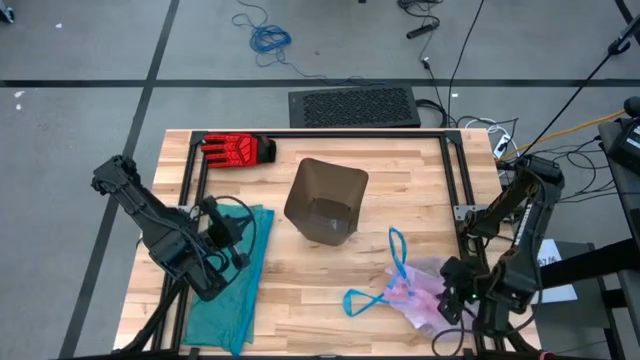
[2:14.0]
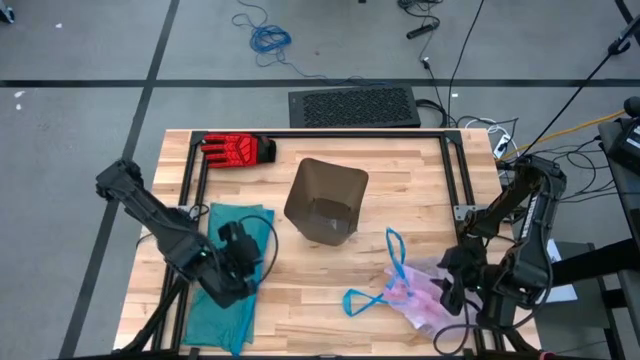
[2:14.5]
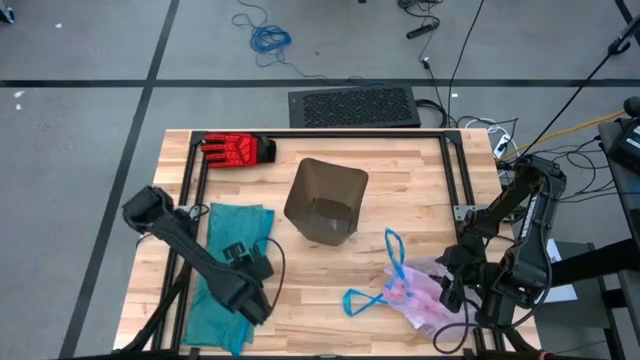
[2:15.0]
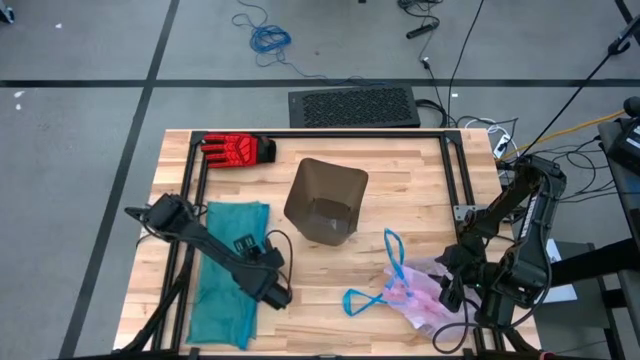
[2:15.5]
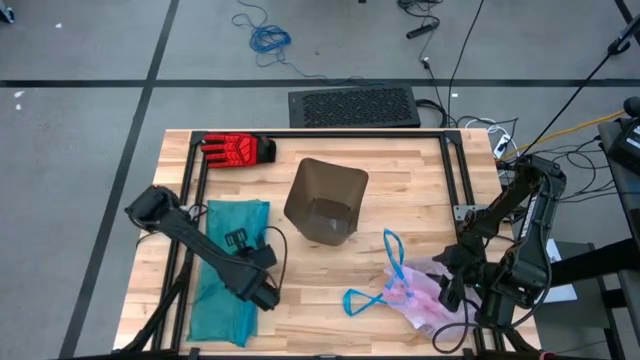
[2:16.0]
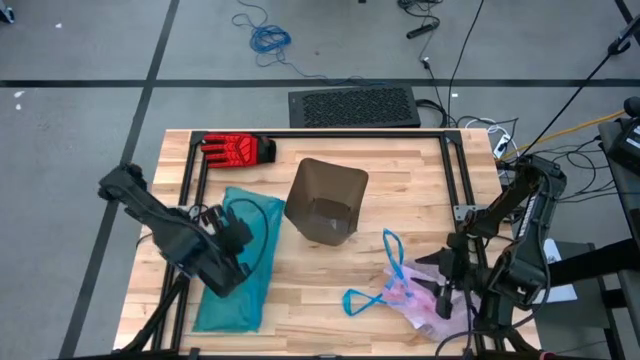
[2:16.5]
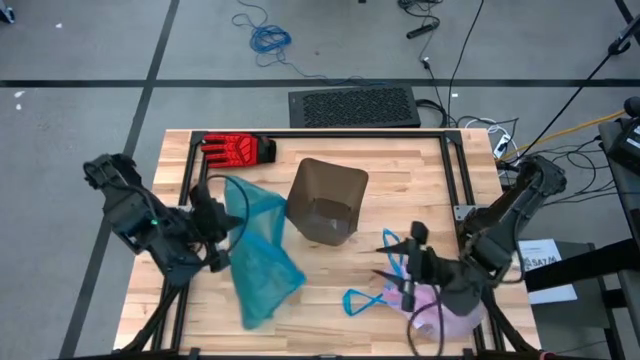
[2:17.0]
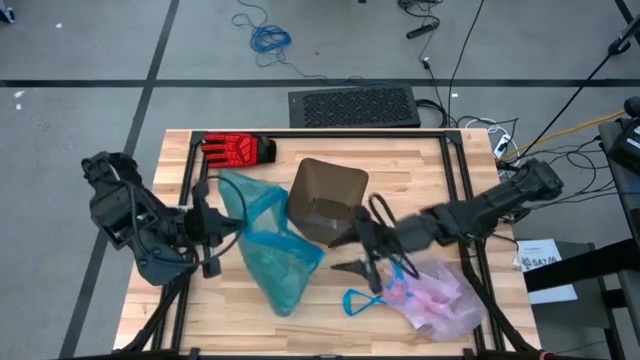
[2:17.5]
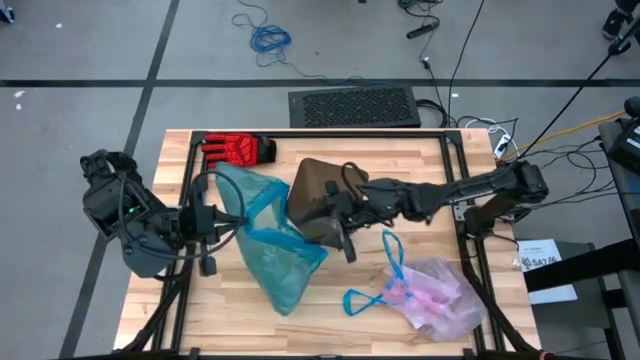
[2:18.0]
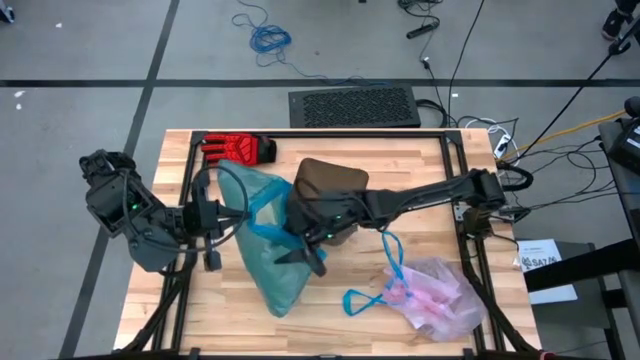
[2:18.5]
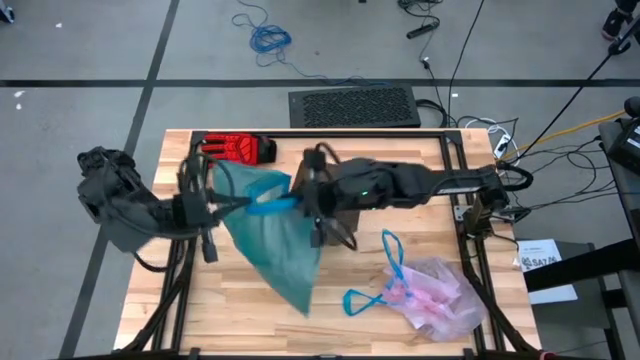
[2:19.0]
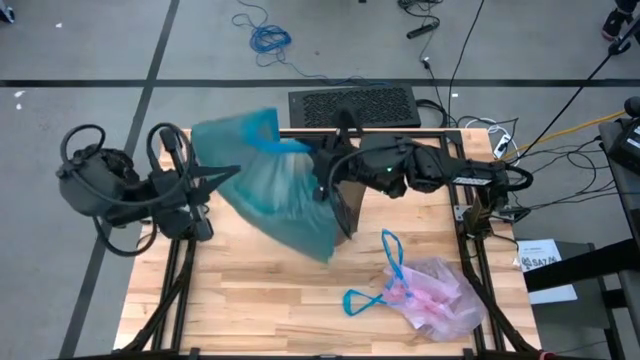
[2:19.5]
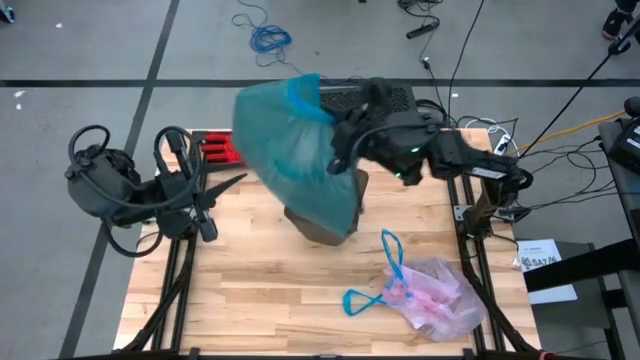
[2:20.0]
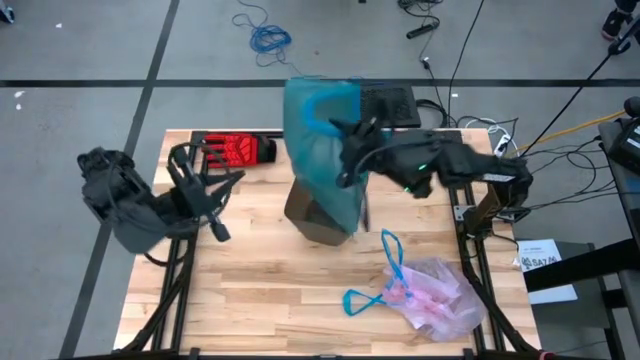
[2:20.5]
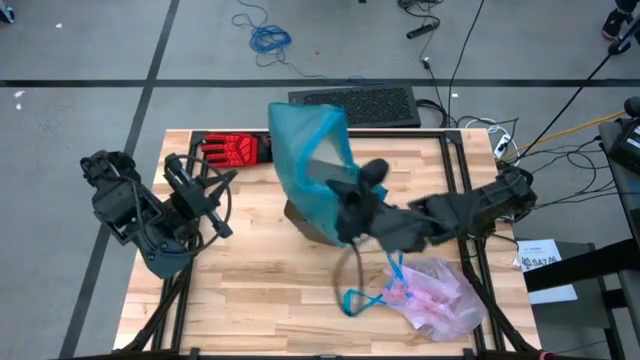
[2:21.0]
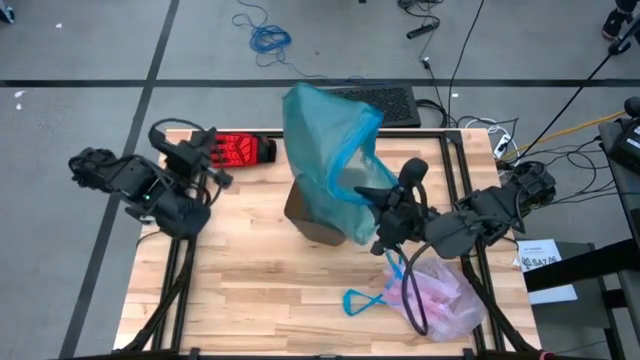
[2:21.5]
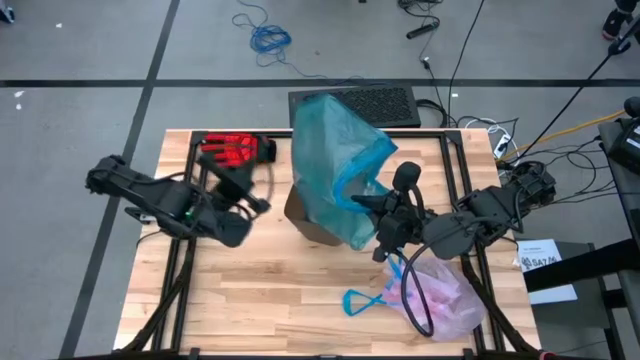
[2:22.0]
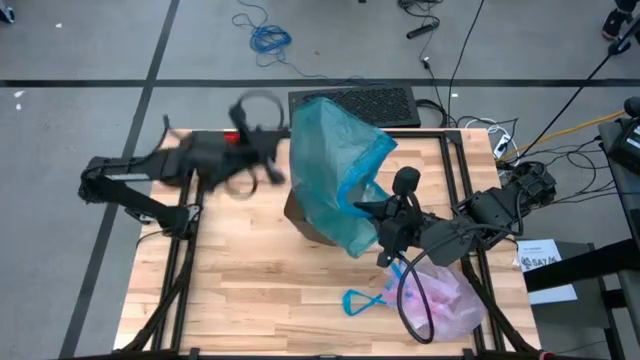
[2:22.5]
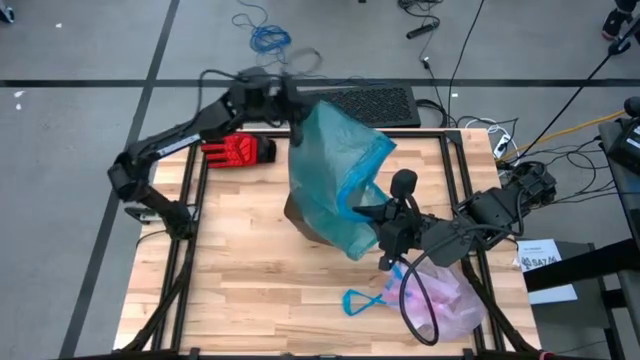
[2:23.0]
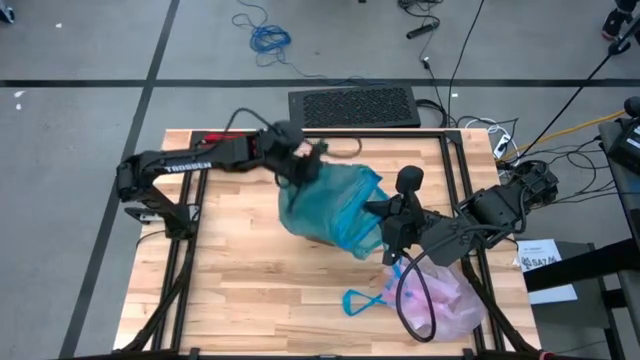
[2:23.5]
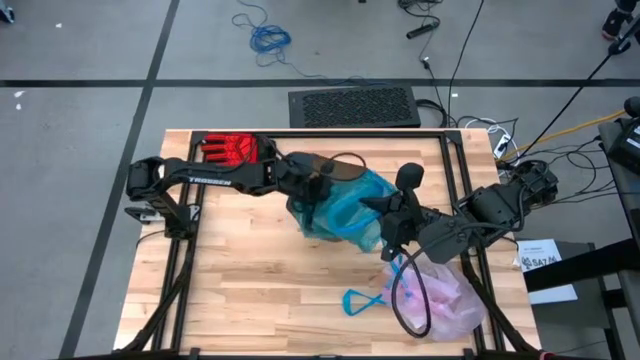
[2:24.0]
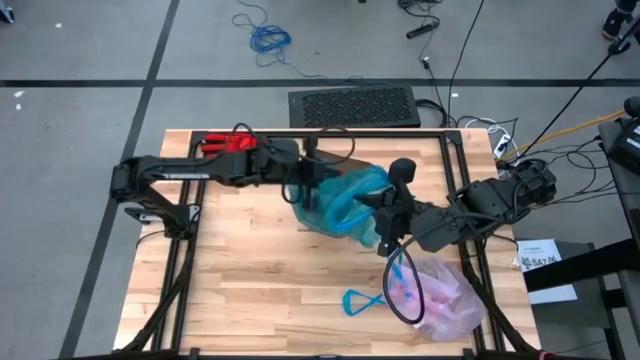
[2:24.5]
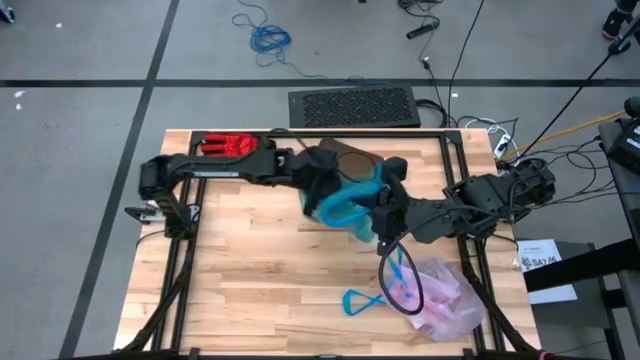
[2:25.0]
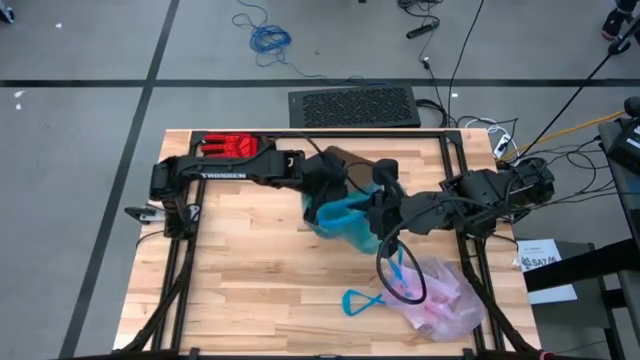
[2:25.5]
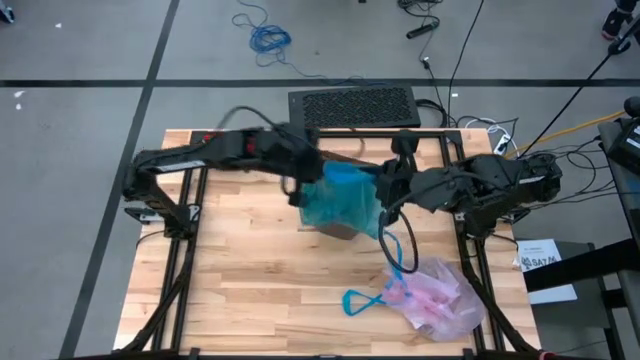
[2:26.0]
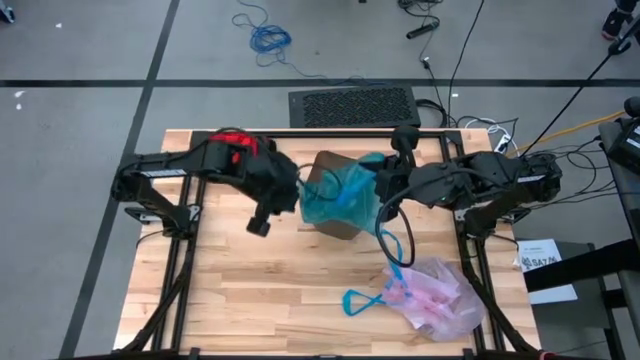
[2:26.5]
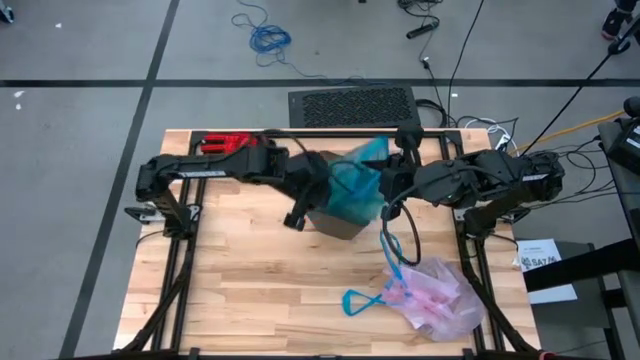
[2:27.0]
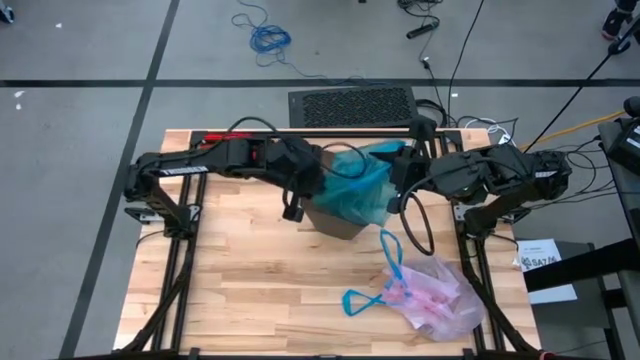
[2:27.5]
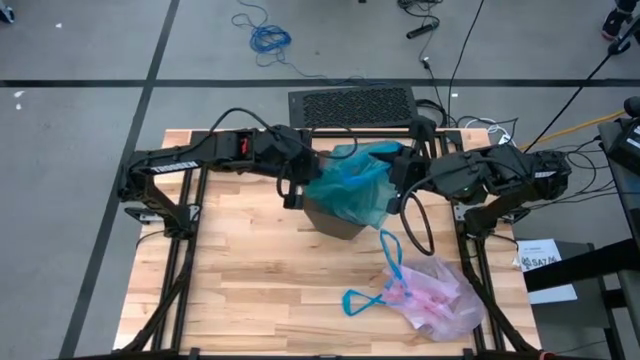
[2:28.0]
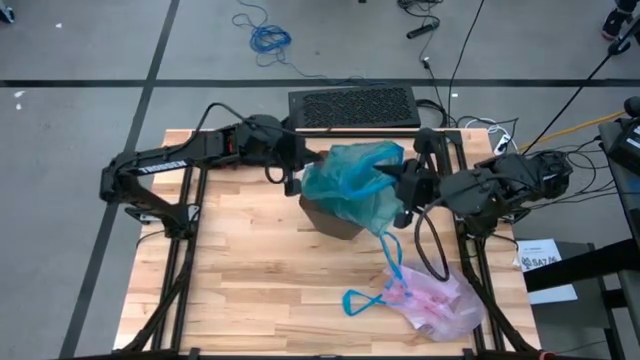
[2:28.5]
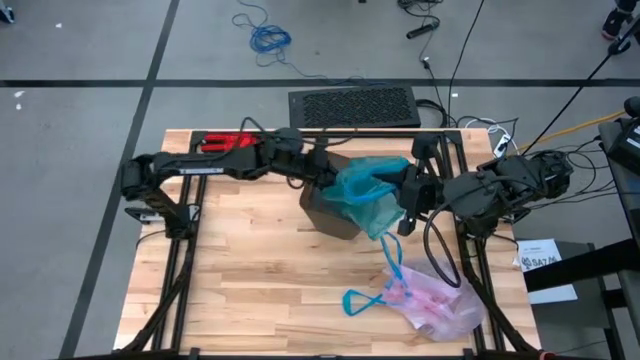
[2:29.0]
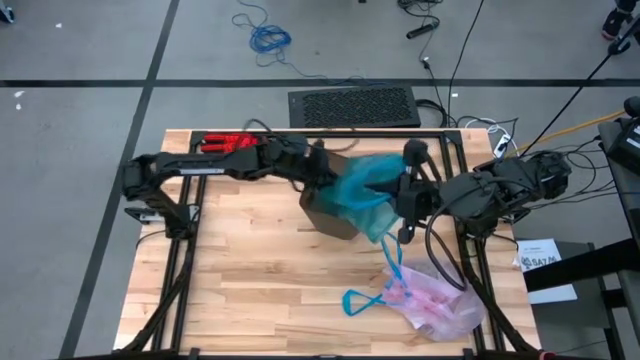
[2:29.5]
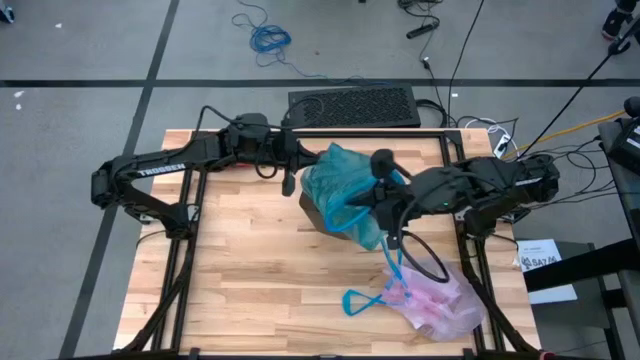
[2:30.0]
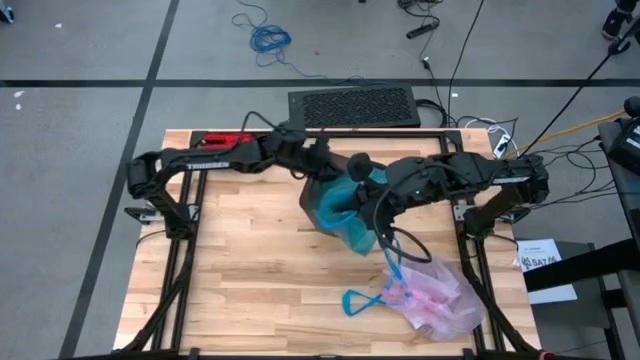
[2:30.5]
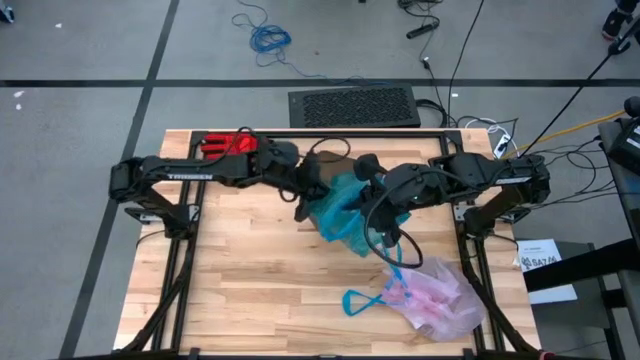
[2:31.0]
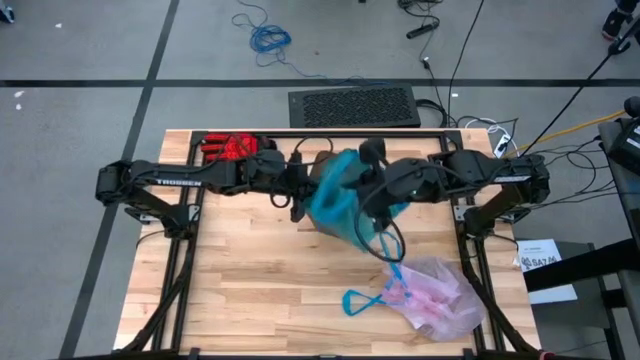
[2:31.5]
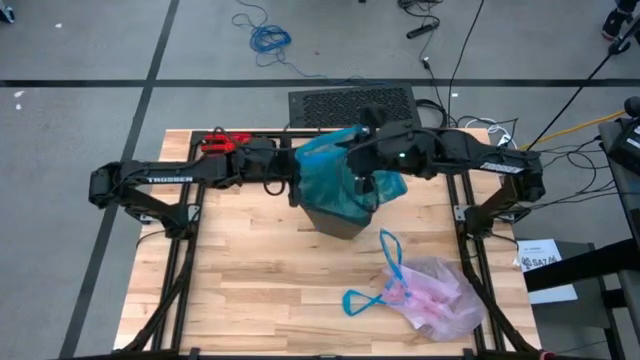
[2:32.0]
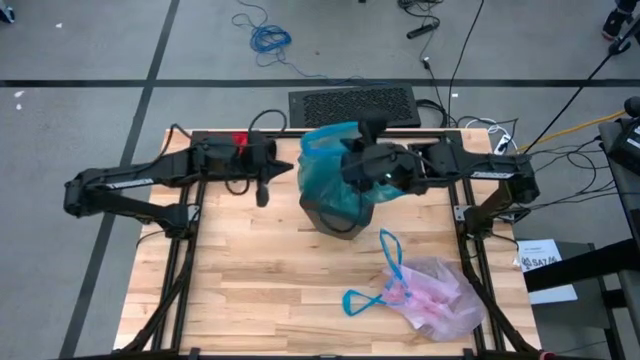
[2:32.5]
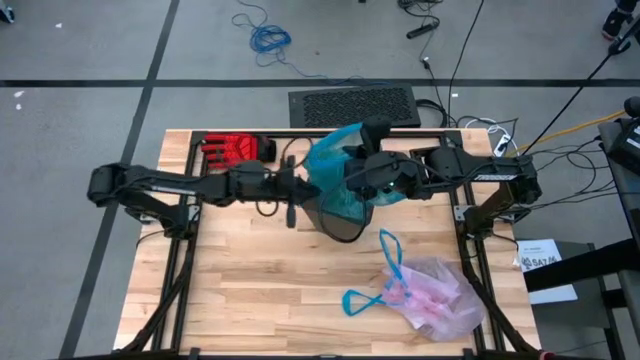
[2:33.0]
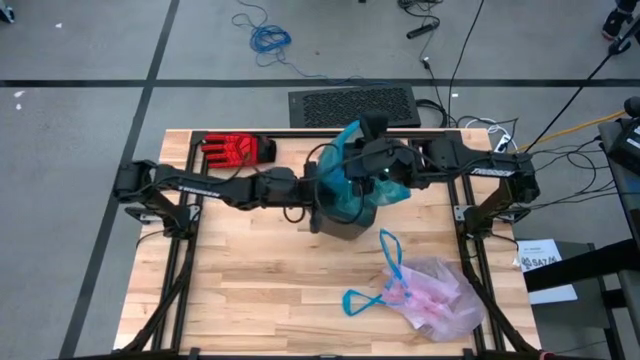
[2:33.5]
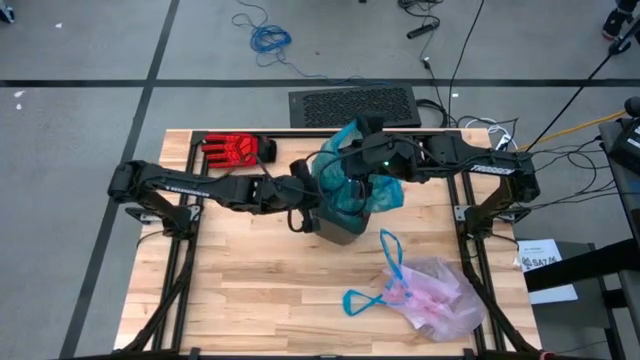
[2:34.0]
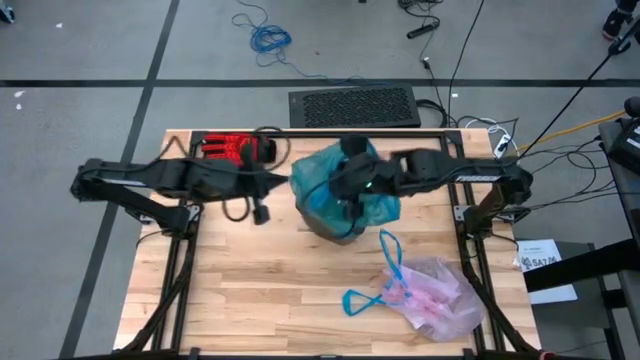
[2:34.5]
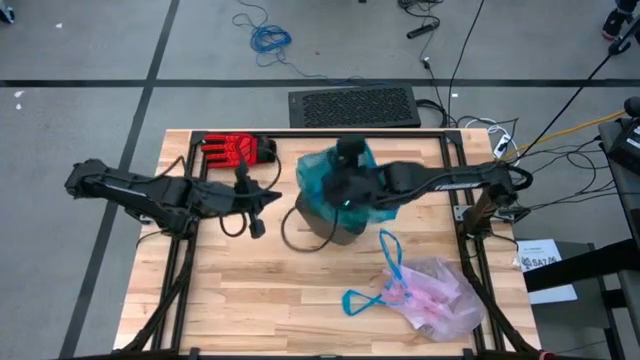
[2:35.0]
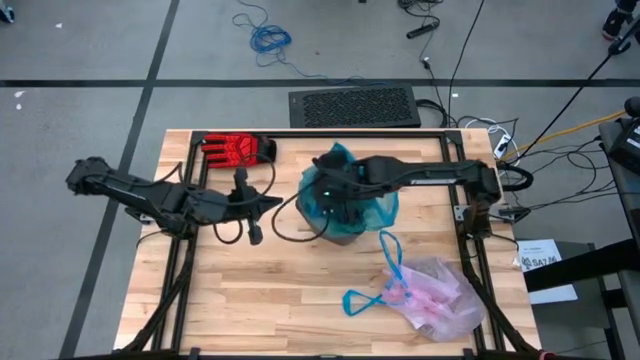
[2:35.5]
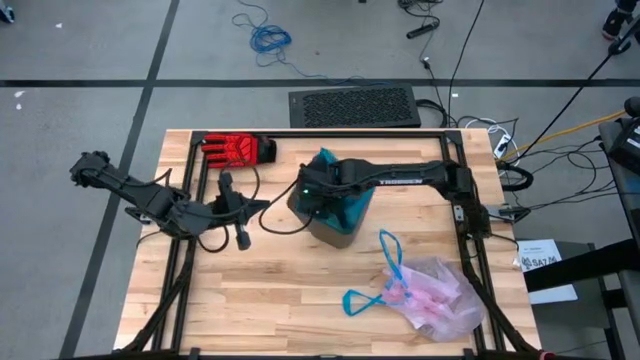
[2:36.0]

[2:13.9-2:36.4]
Task: place trash/remove bag and relplace
Insert the blue trash bag into the black trash bin

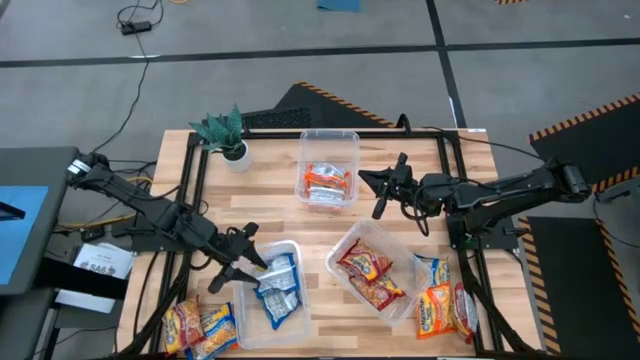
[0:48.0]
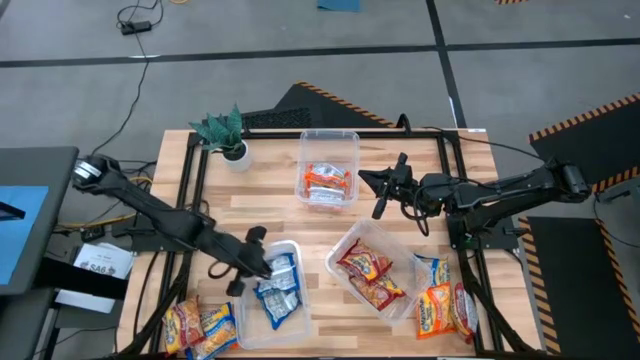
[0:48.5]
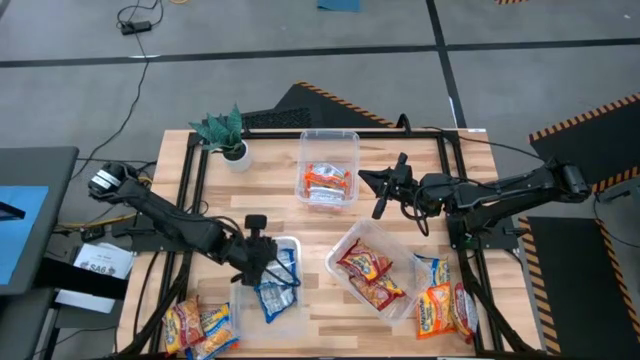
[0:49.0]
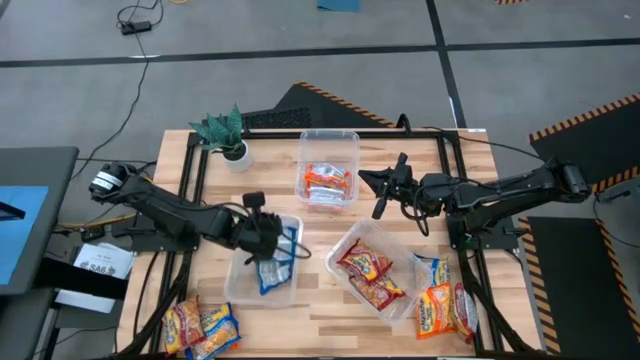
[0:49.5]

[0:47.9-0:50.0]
Task: Sort Maruchan noodles
Move the bottom left transparent bin to the center of the table
